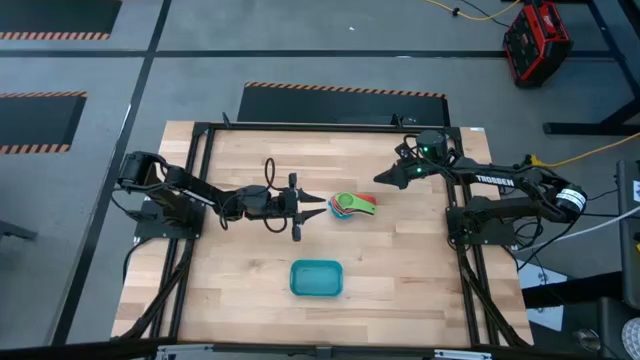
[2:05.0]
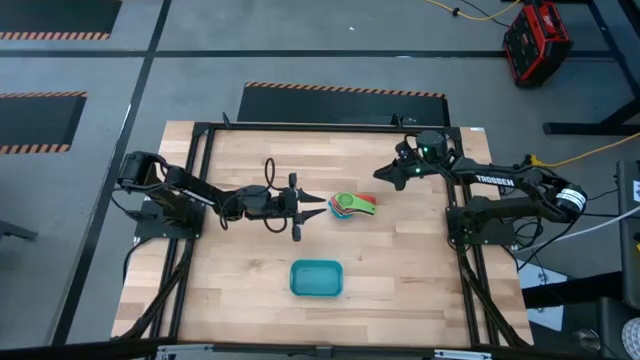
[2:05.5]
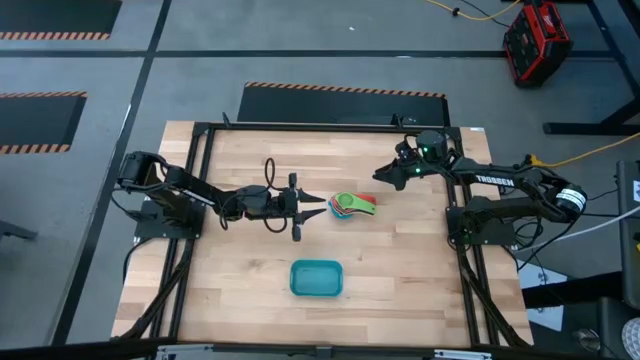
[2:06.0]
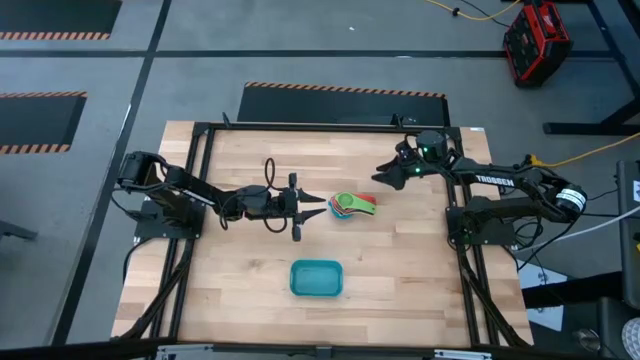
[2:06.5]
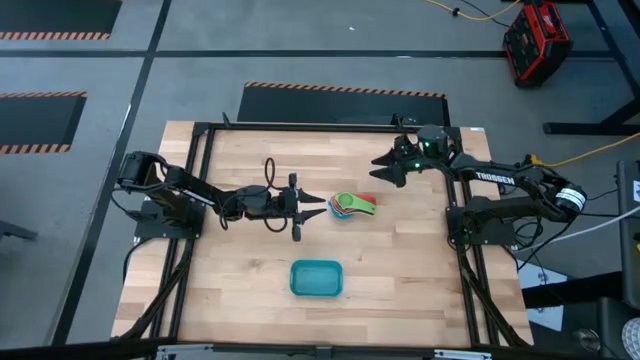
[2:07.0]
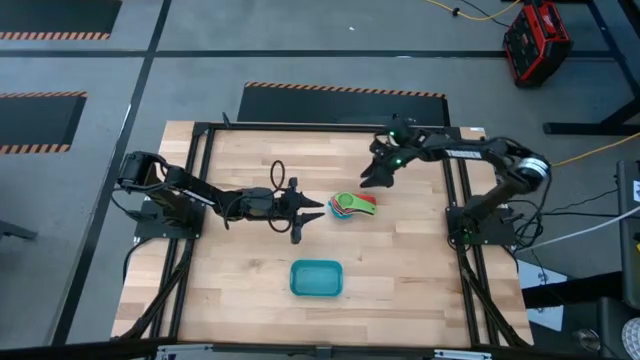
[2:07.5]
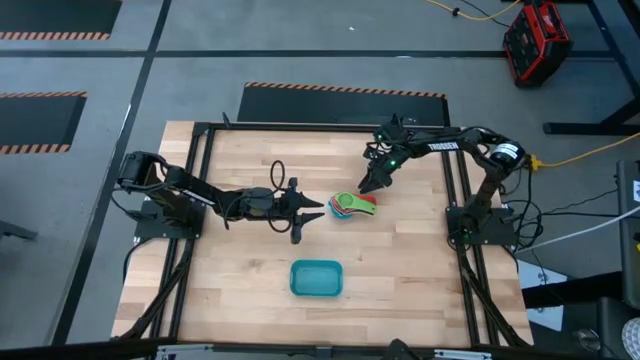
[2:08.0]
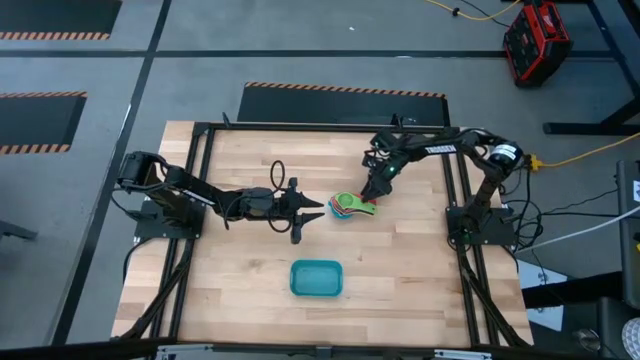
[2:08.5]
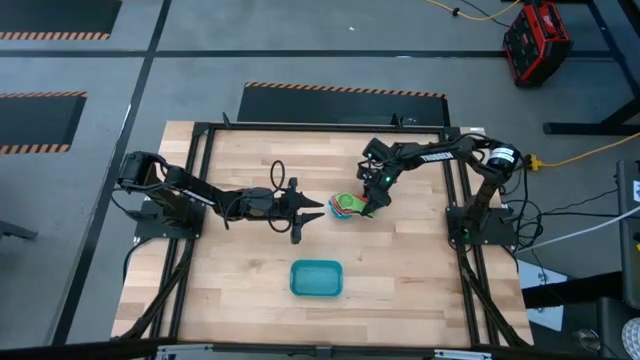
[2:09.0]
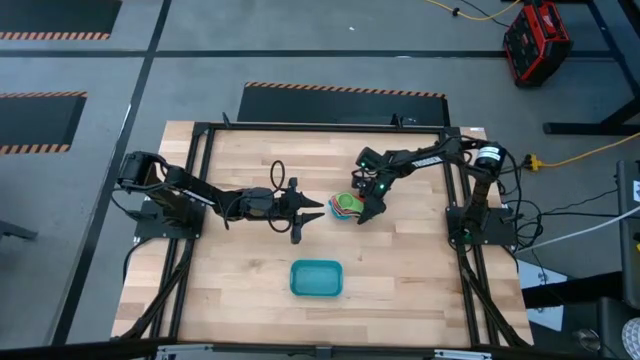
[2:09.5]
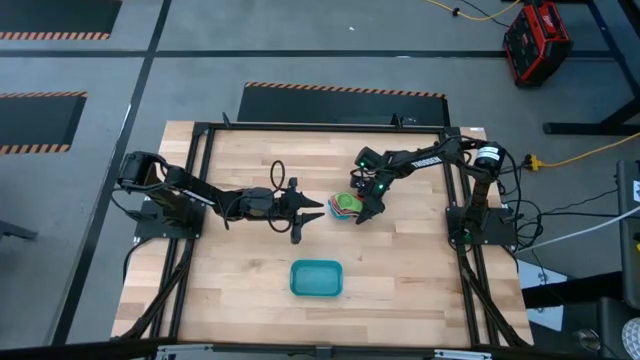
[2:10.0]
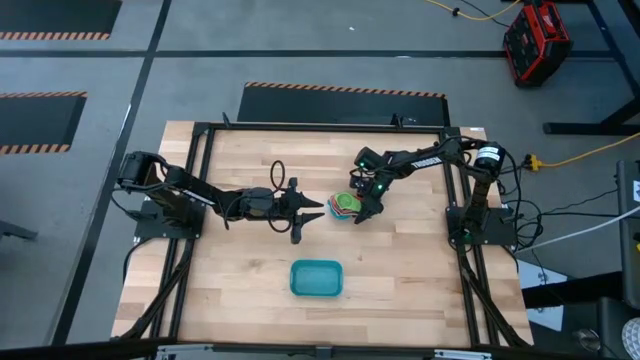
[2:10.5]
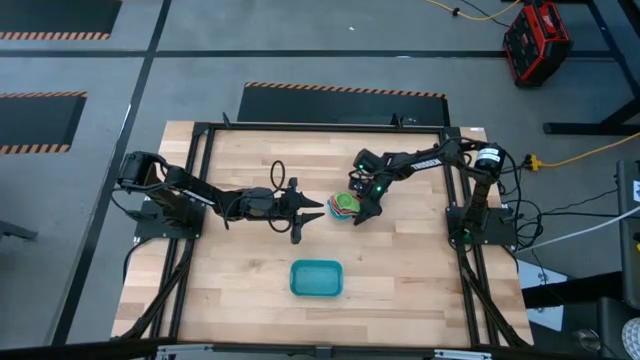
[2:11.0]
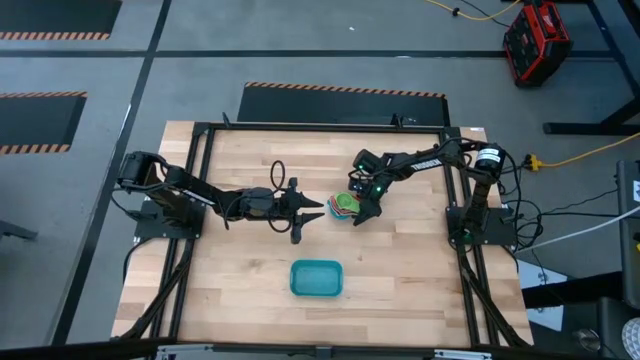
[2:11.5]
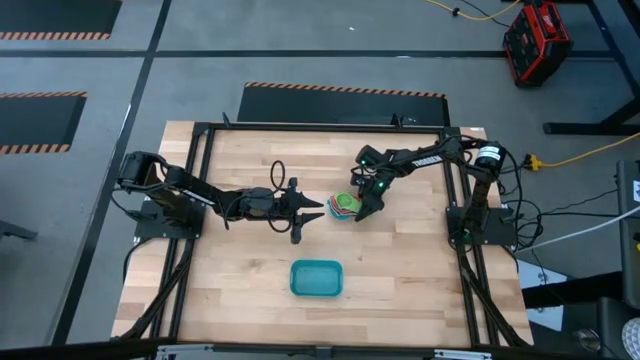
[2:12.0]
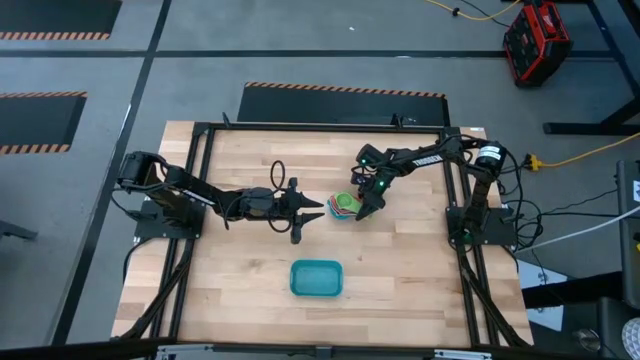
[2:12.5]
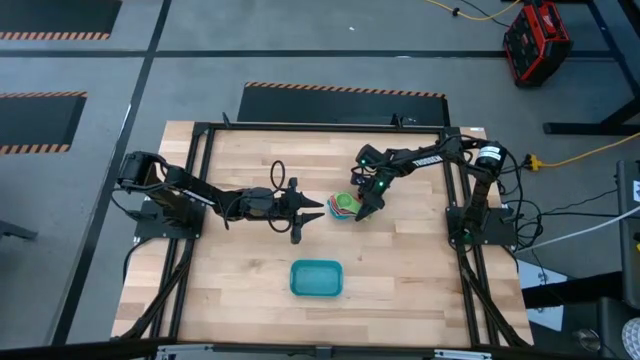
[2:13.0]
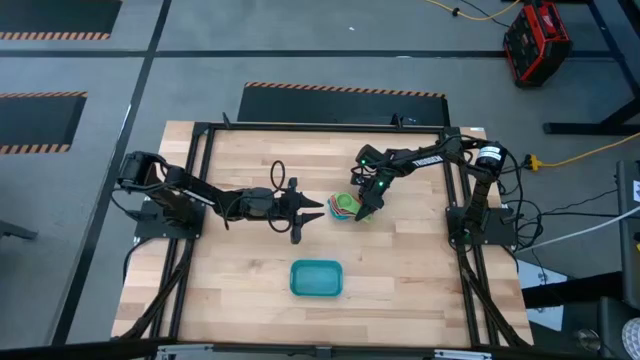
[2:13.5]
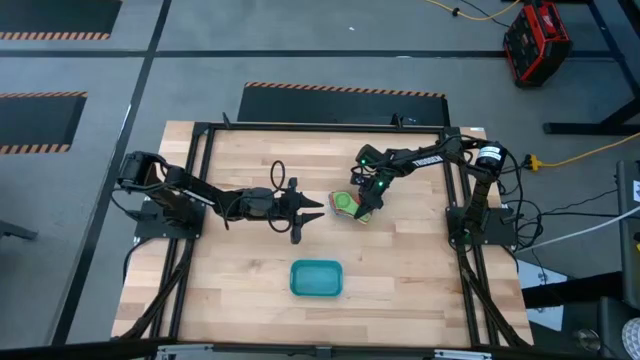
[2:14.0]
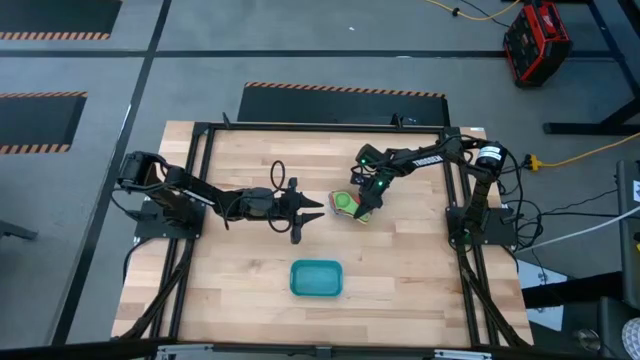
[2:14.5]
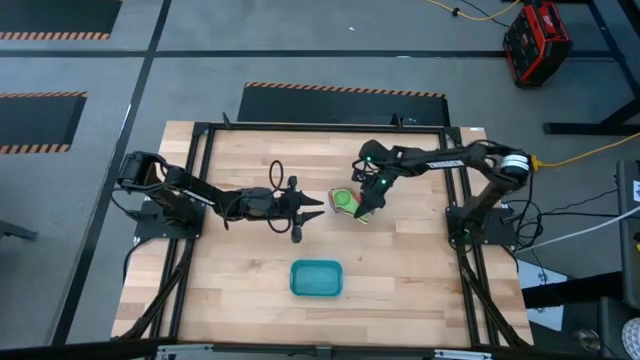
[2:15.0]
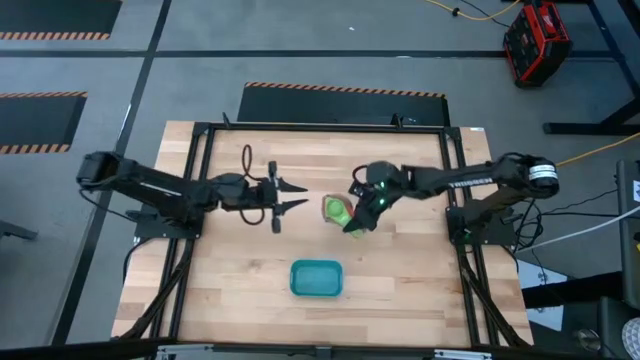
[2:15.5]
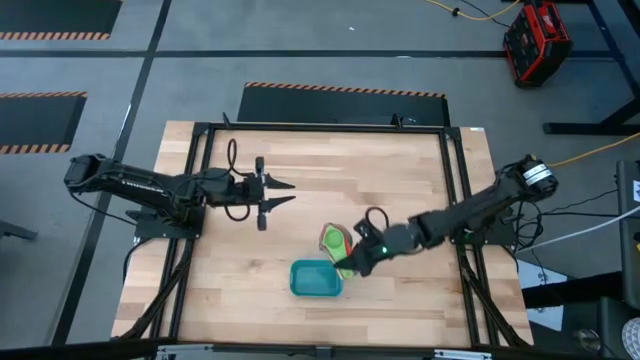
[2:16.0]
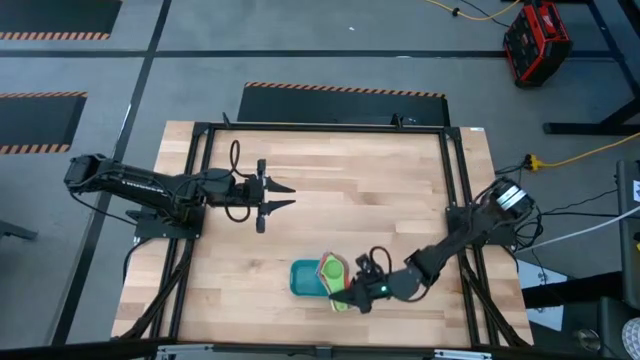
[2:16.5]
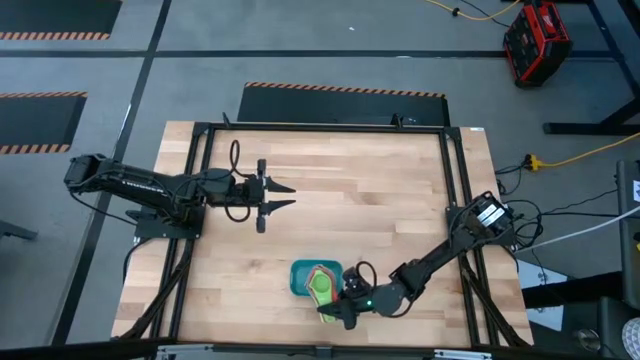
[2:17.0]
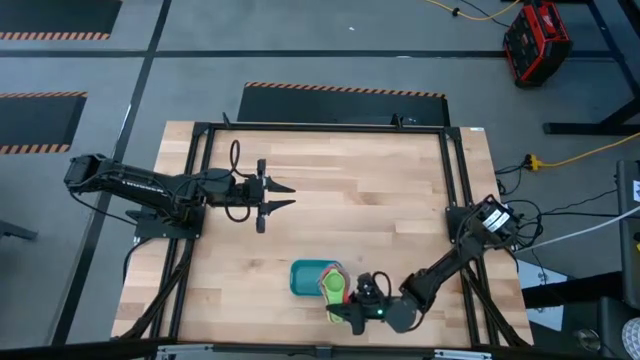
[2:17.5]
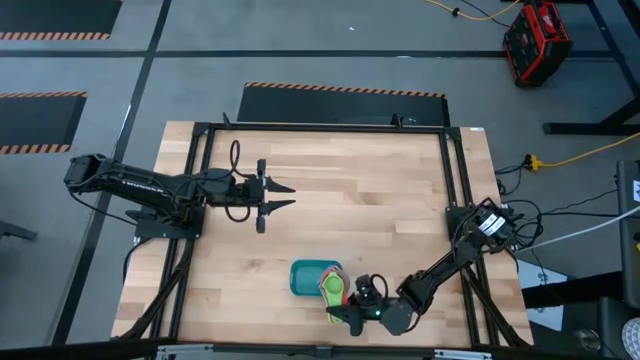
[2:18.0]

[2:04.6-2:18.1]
Task: Nest measuring cups in basket
Put the nested measuring cups into the blue bin

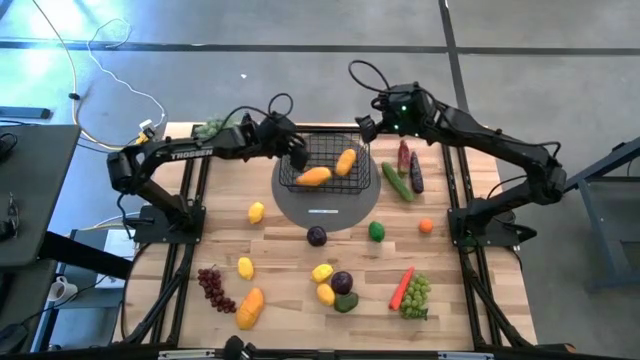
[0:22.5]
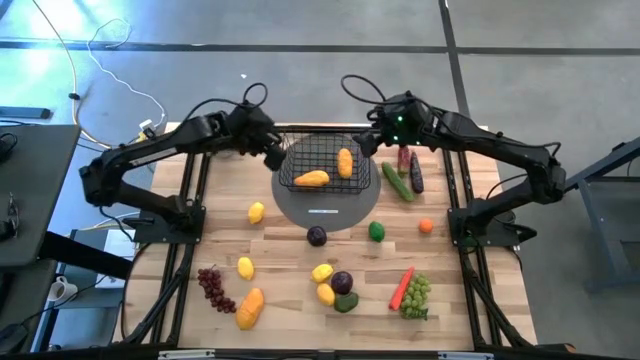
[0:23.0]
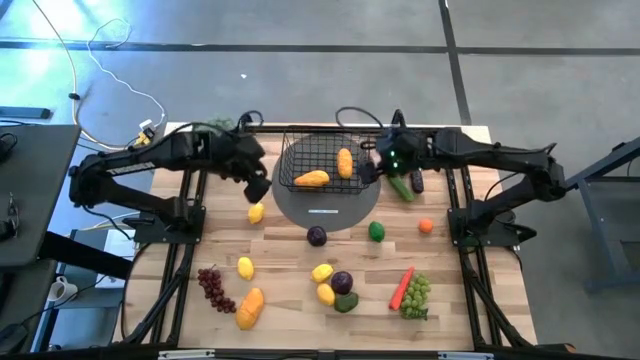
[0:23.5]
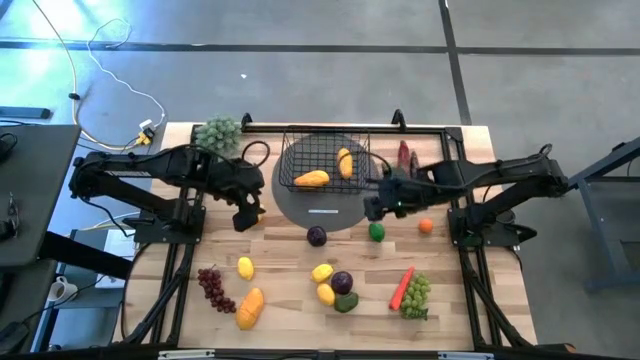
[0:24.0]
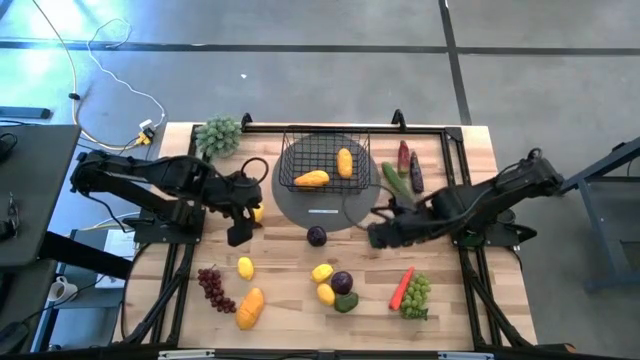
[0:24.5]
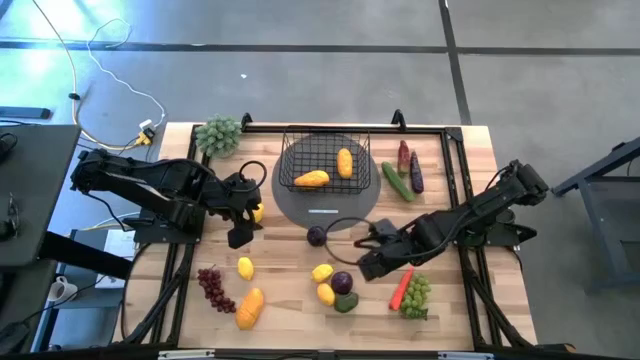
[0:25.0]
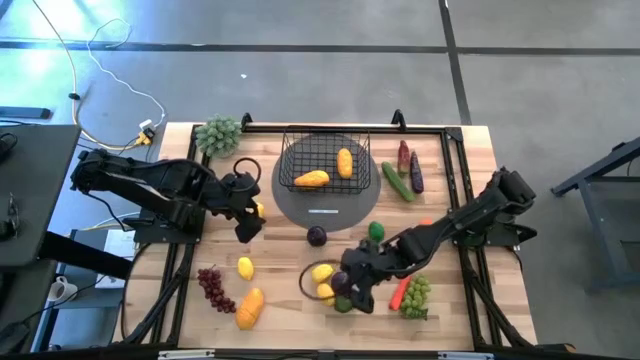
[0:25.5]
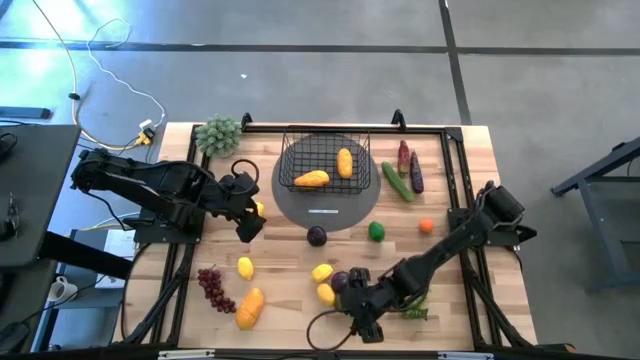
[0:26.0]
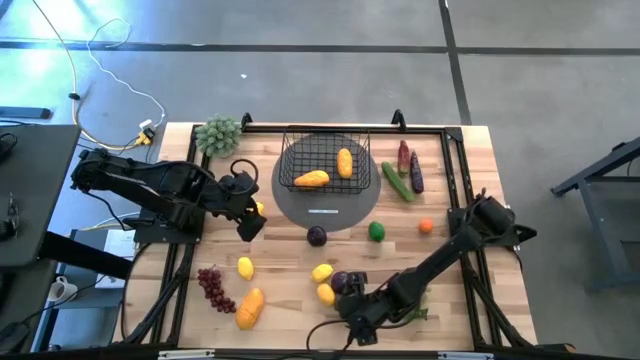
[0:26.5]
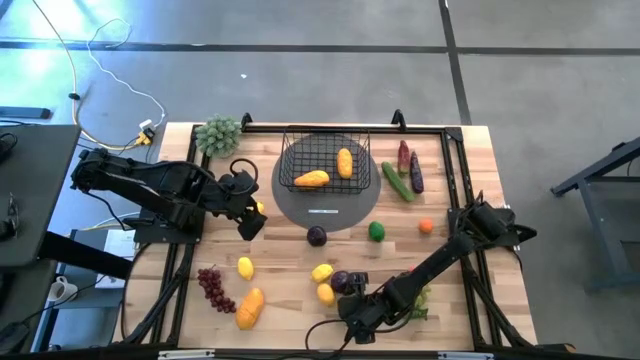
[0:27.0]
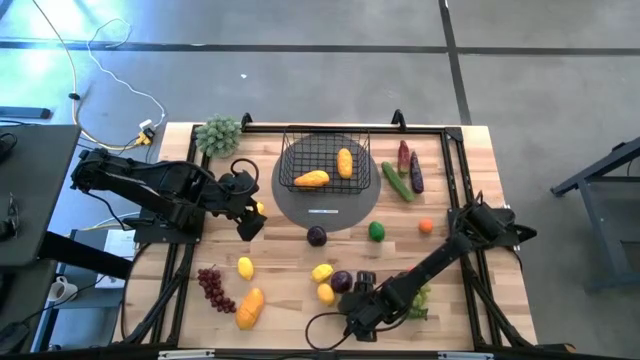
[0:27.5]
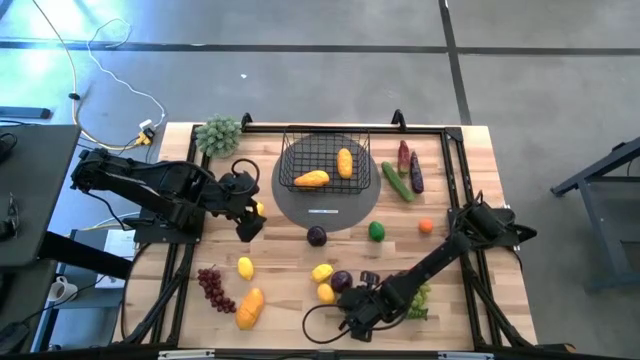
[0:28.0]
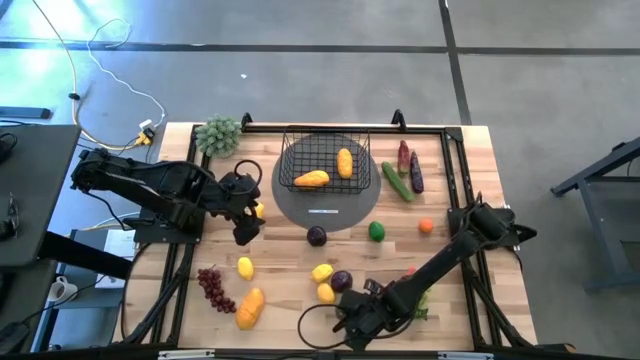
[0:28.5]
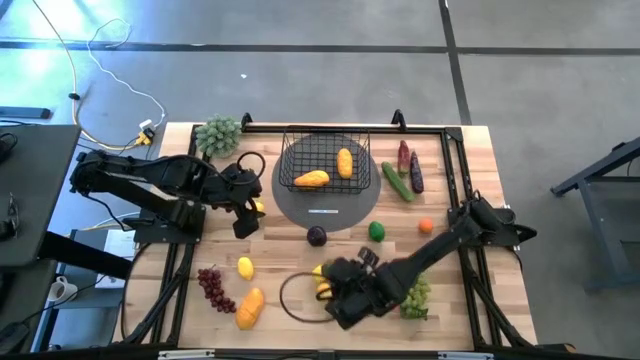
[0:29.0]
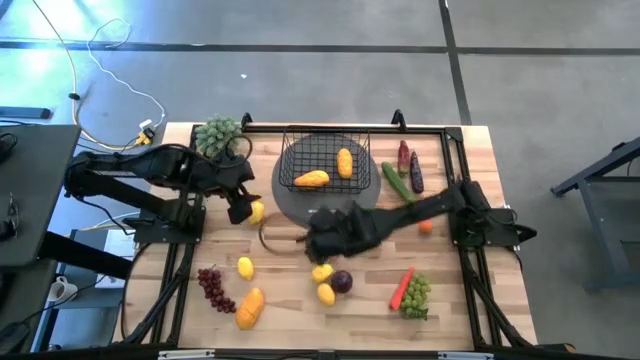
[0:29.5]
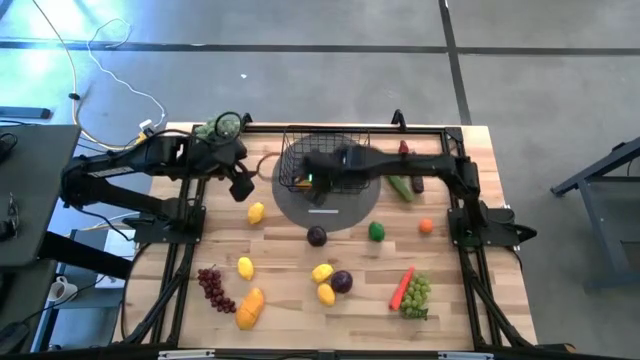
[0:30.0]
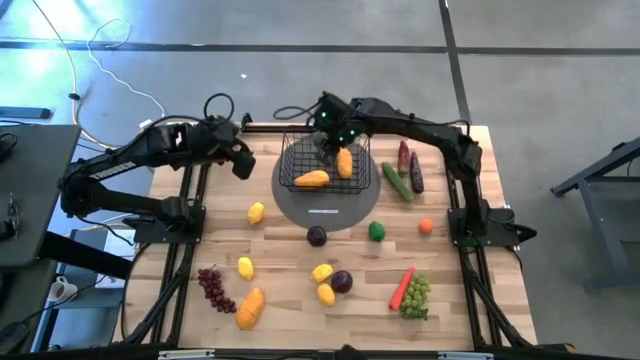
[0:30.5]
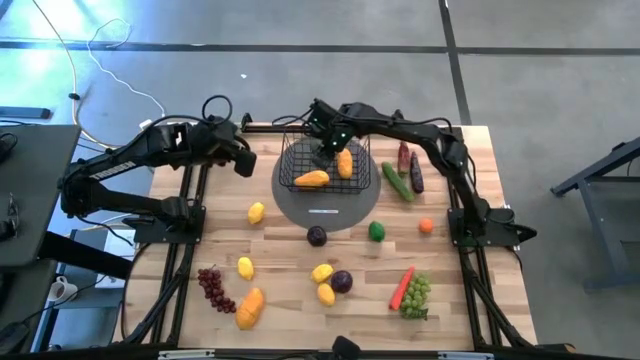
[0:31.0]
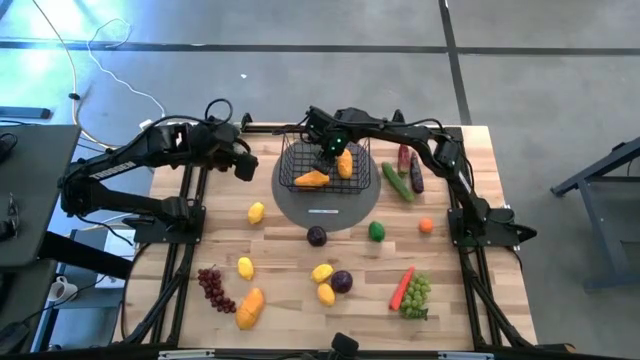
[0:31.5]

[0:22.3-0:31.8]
Task: Build produce basket
Put the green lime into the wire basket
